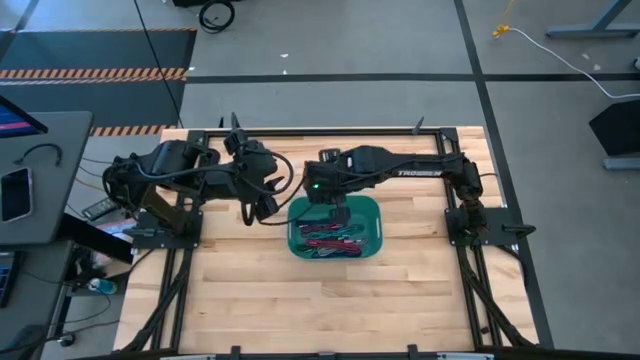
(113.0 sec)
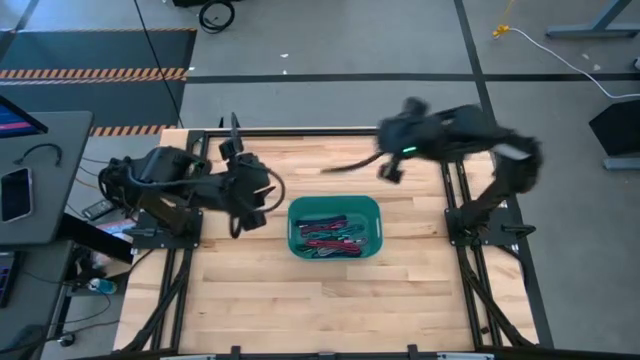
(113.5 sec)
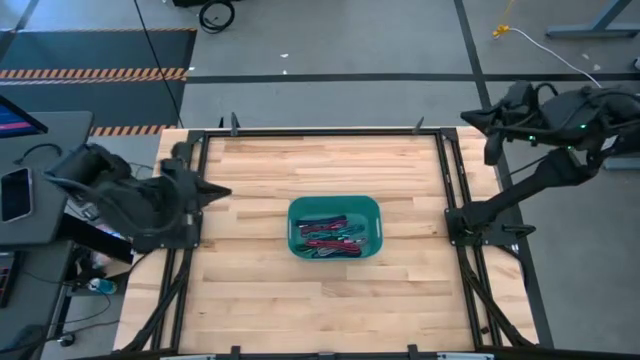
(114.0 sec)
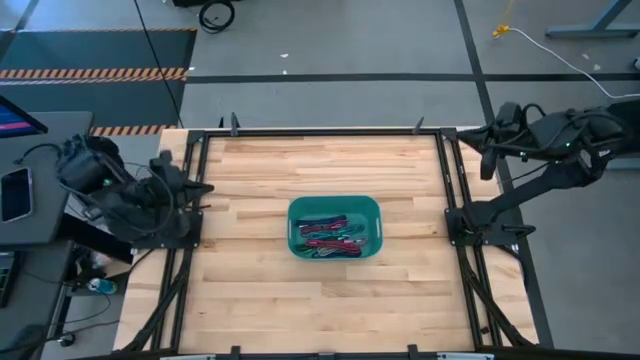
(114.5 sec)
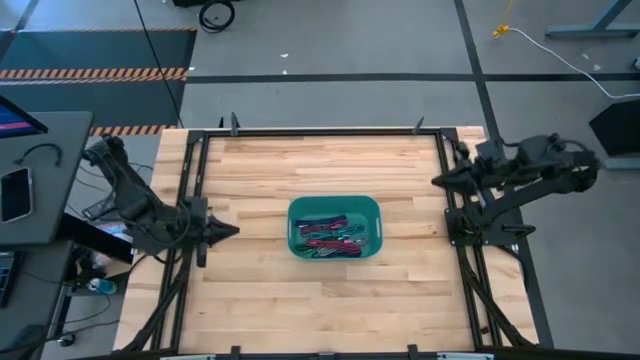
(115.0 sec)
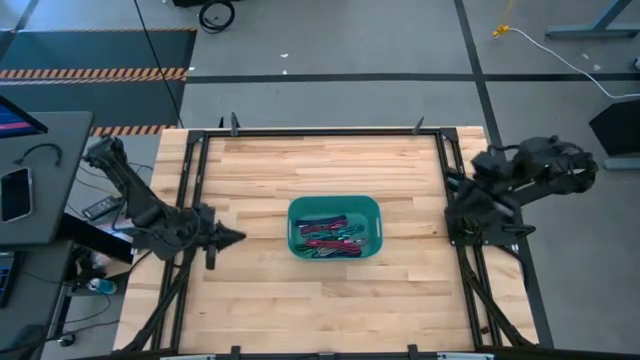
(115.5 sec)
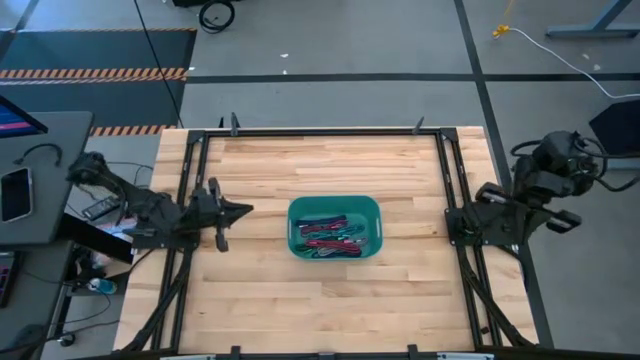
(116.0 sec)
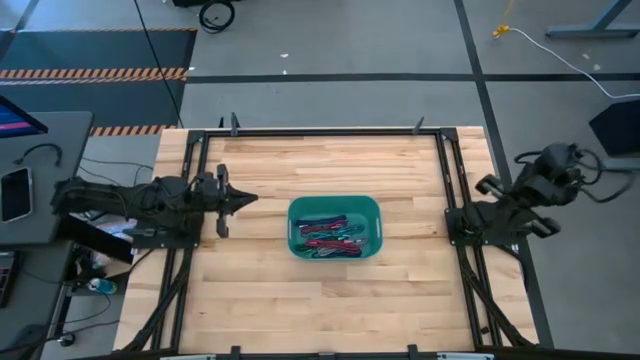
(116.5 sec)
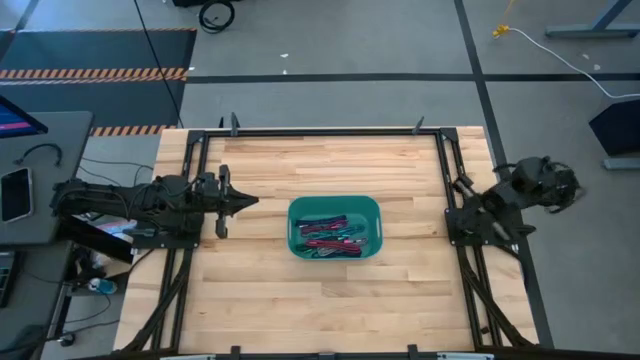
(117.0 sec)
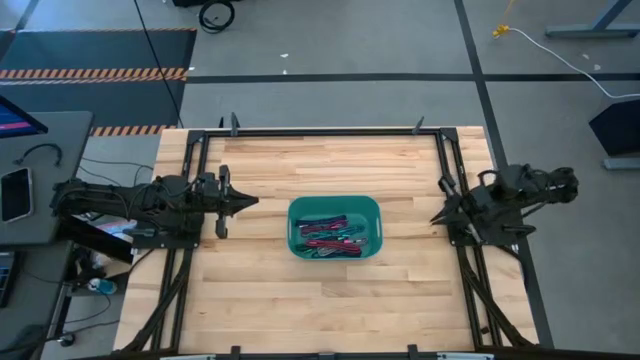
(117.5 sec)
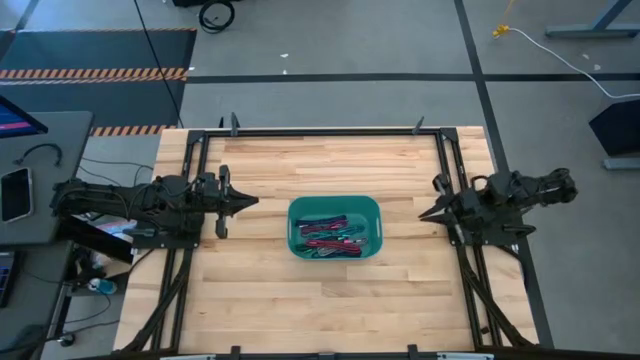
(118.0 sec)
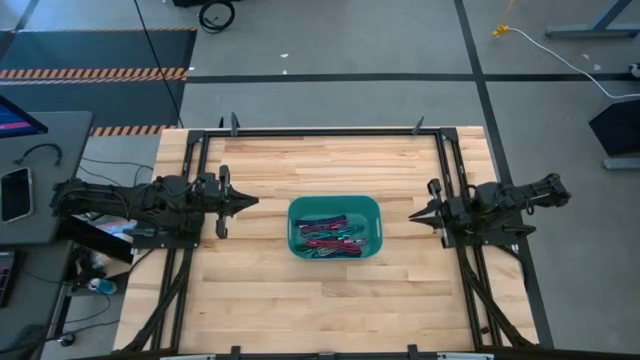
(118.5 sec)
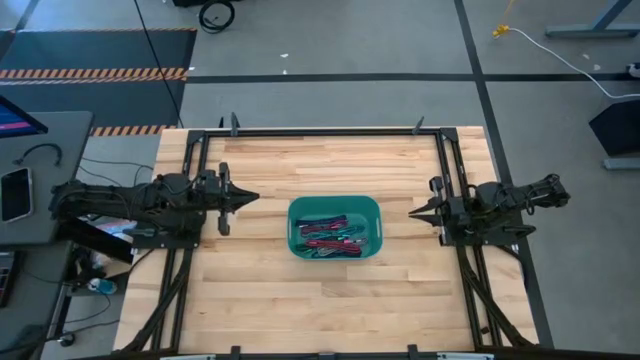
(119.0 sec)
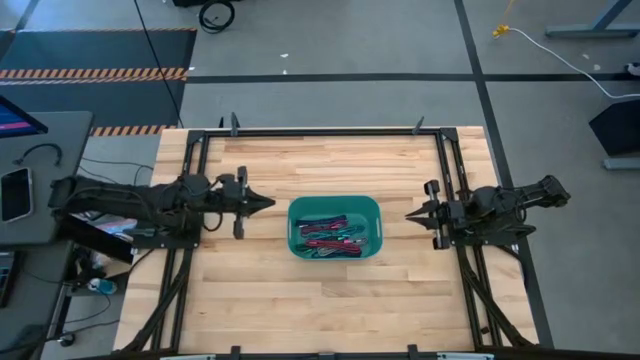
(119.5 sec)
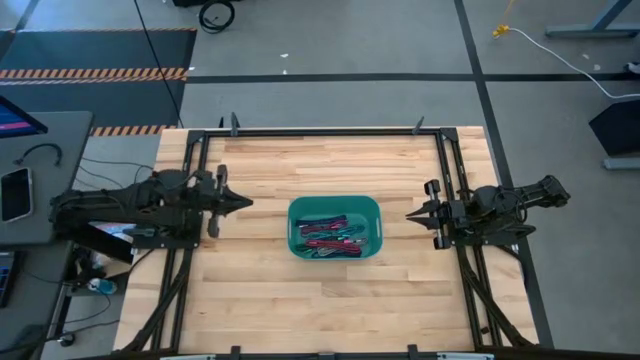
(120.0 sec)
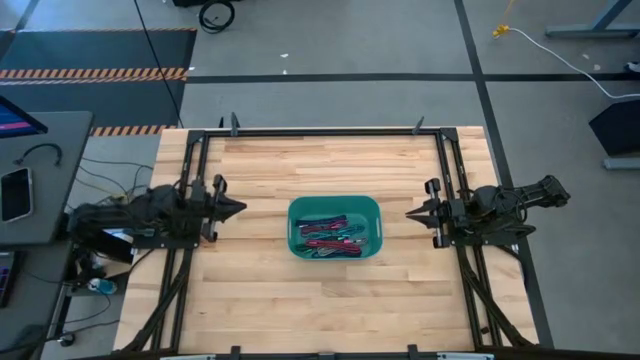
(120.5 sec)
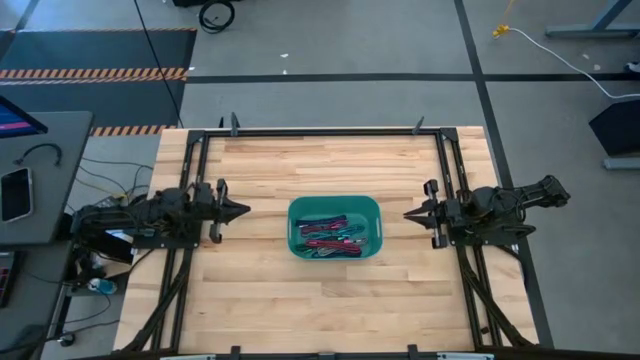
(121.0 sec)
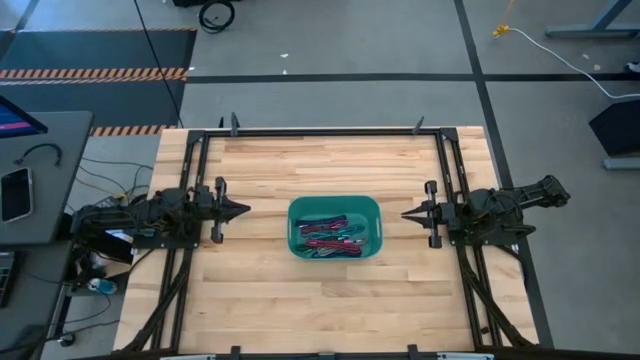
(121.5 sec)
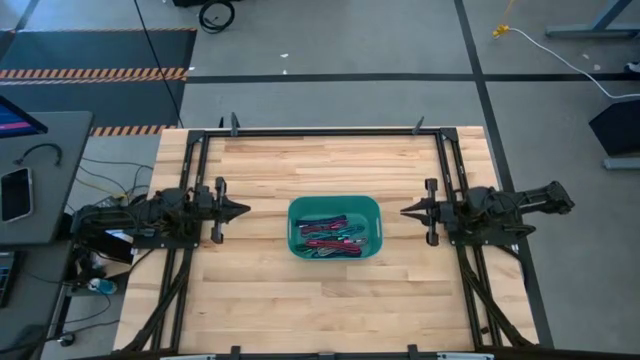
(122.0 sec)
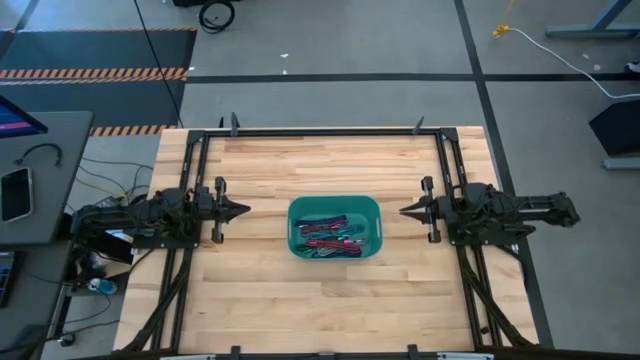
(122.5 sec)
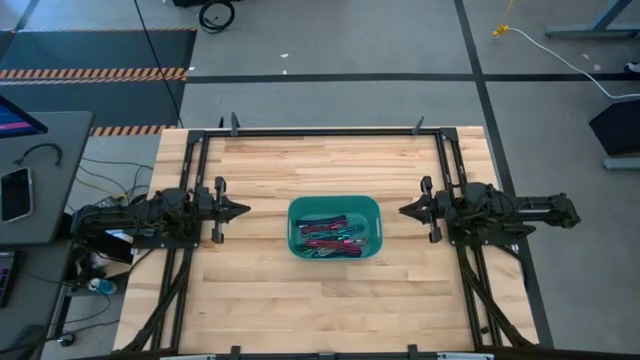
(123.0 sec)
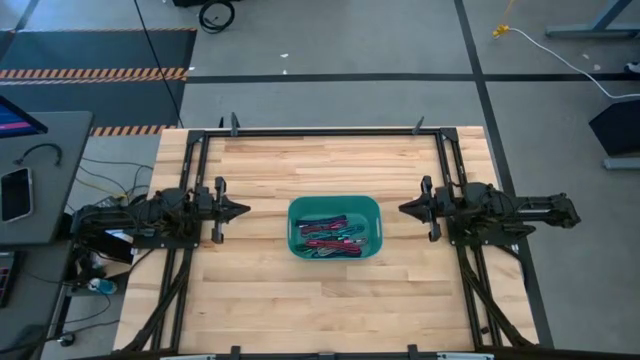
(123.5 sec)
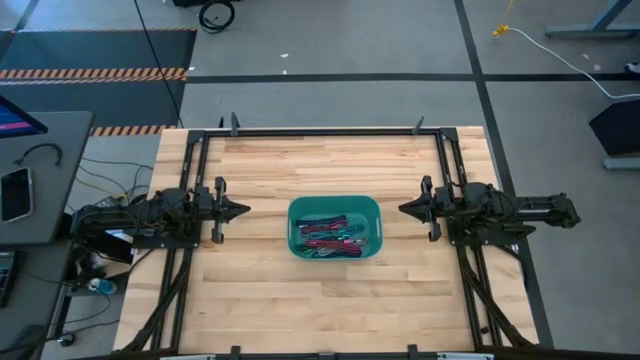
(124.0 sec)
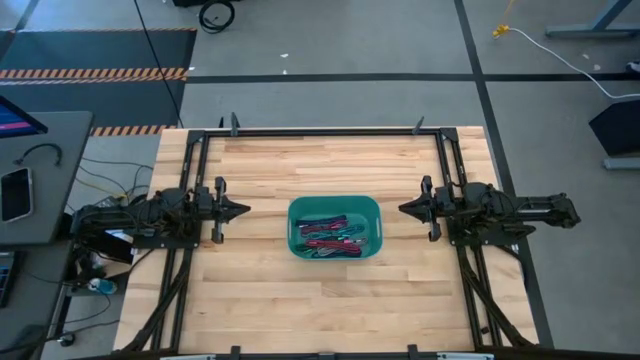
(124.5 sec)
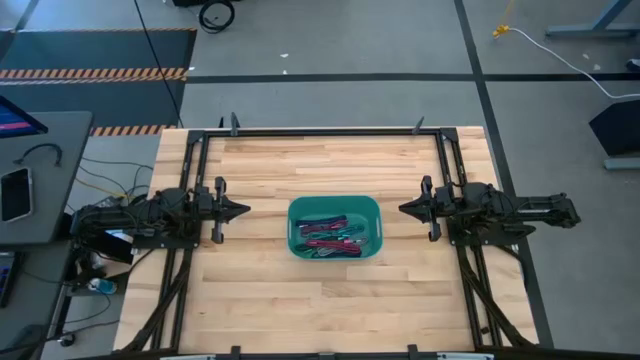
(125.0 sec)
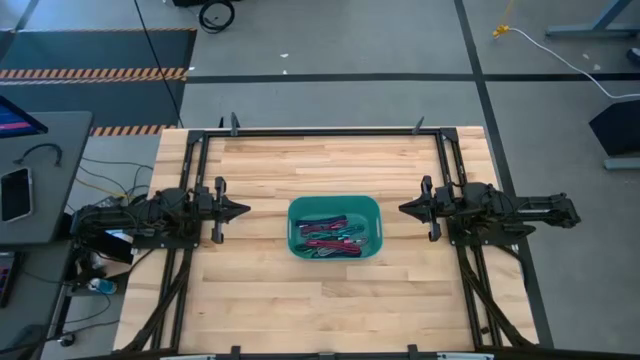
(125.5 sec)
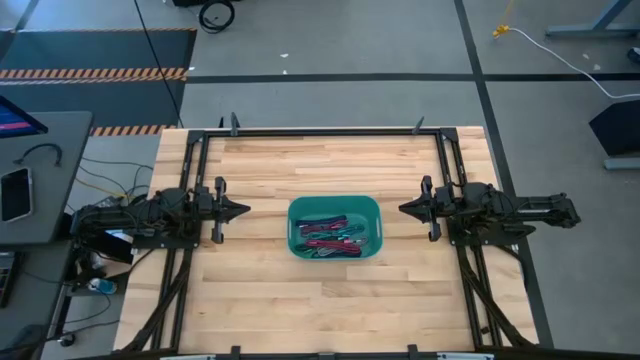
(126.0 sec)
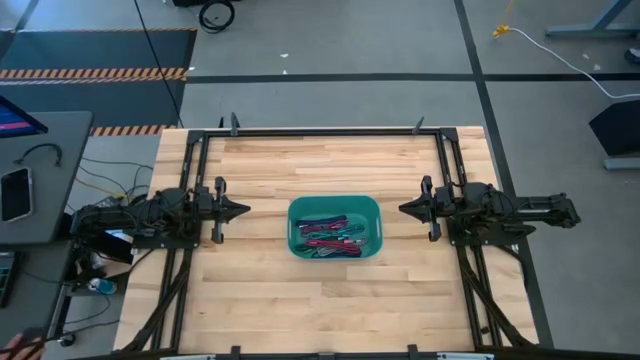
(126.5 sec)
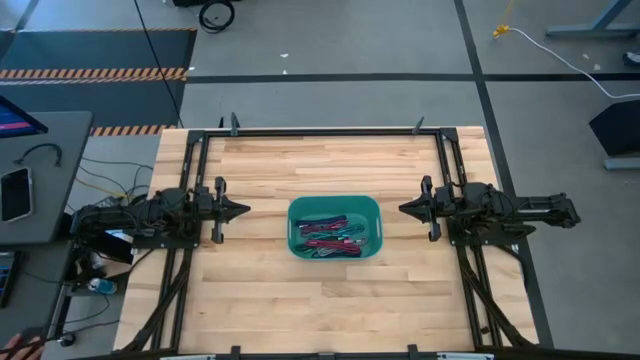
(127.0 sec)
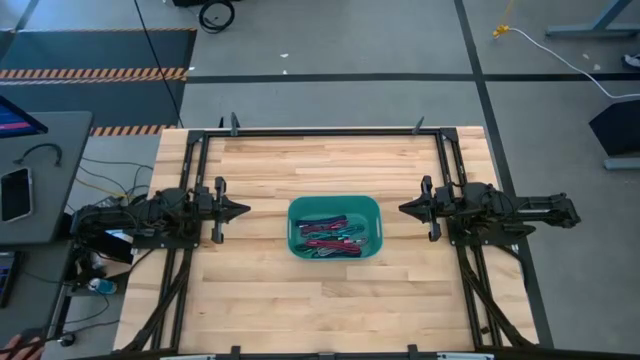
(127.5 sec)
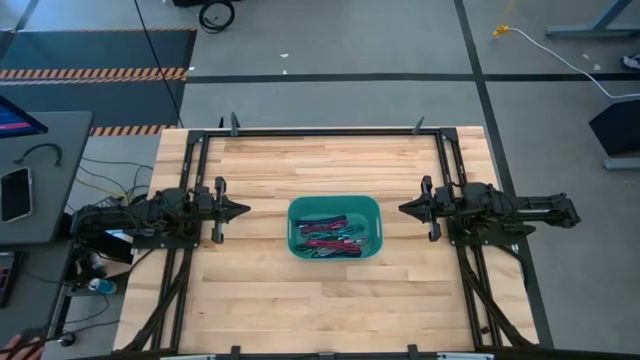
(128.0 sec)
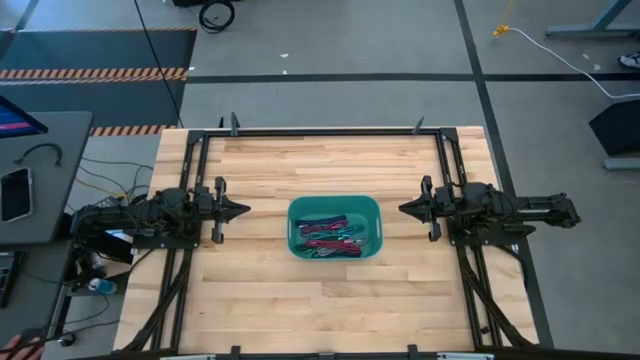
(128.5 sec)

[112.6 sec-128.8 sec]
Task: Pick and place USB-C Cables
Return to Home Position

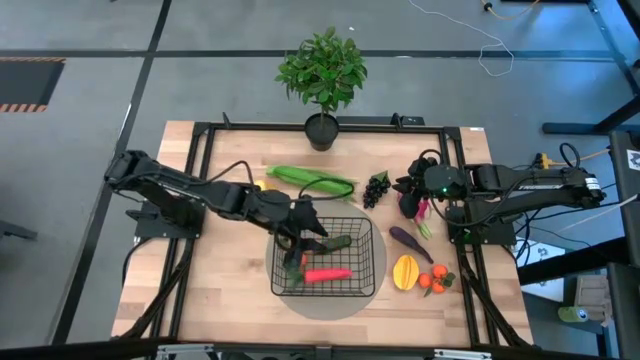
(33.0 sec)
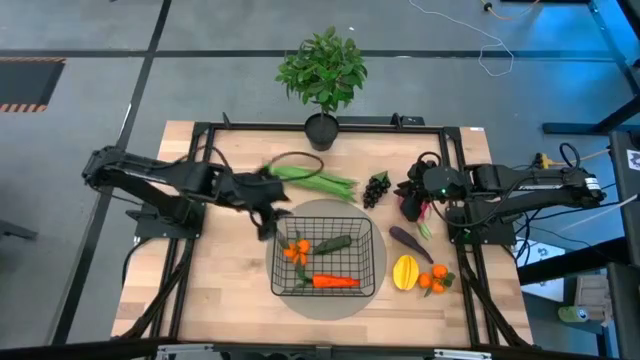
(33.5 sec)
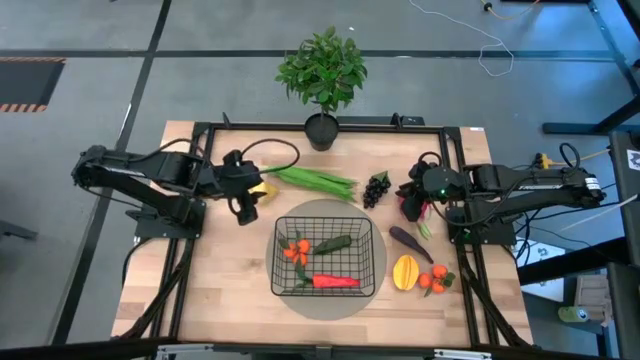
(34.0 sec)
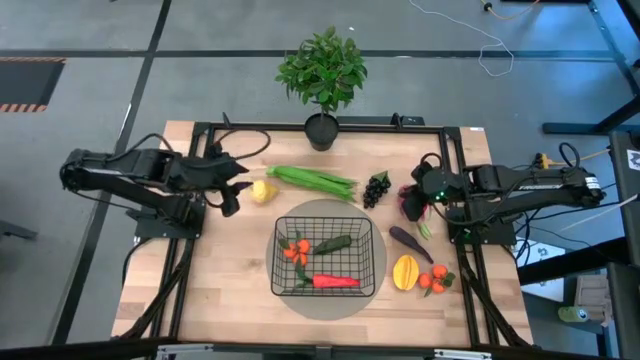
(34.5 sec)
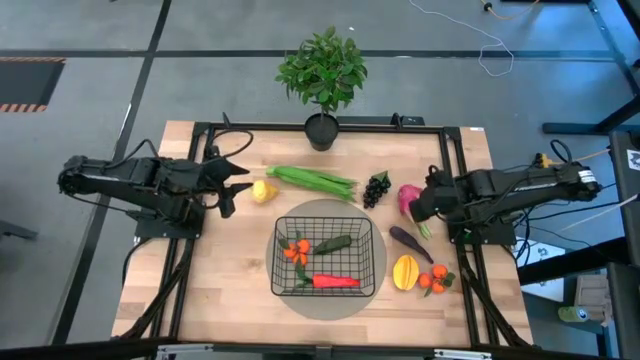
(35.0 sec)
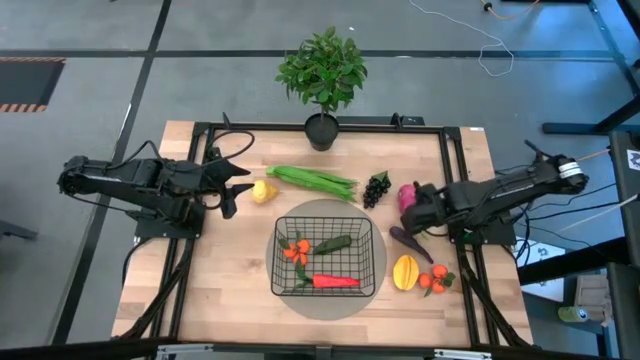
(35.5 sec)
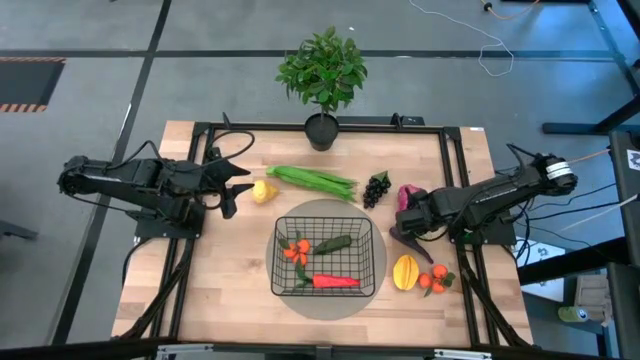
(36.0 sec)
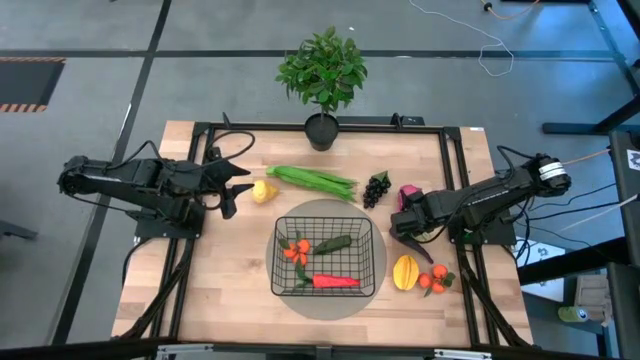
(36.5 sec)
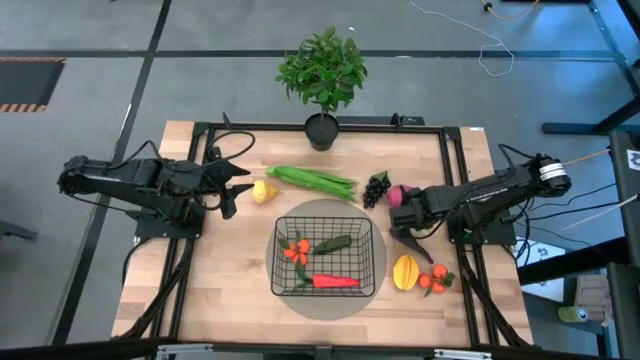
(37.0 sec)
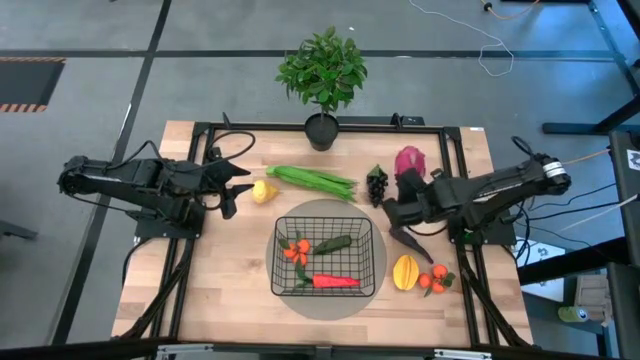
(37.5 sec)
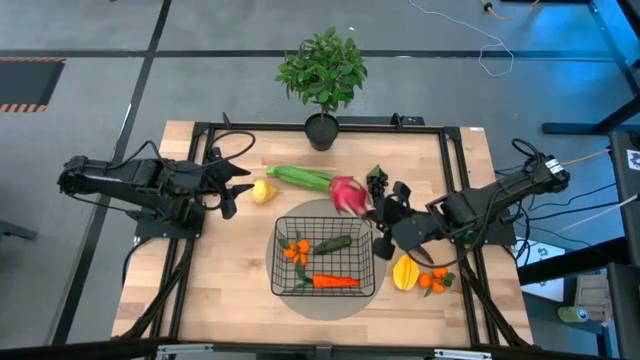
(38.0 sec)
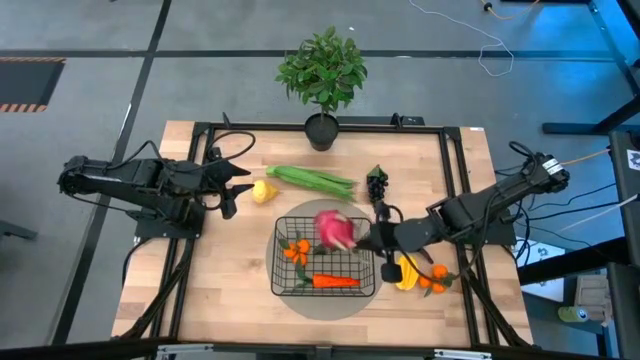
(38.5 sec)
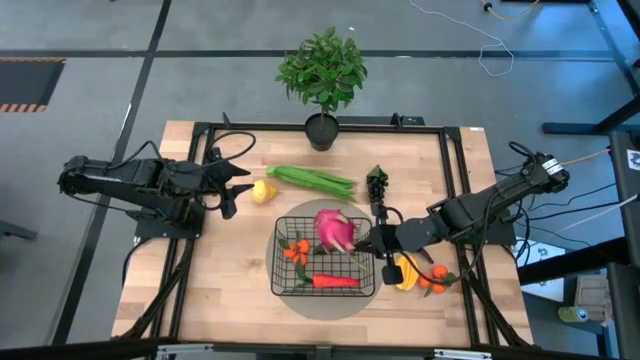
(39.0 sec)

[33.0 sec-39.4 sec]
Task: Build produce basket
Put the dragon fruit into the black wire basket
